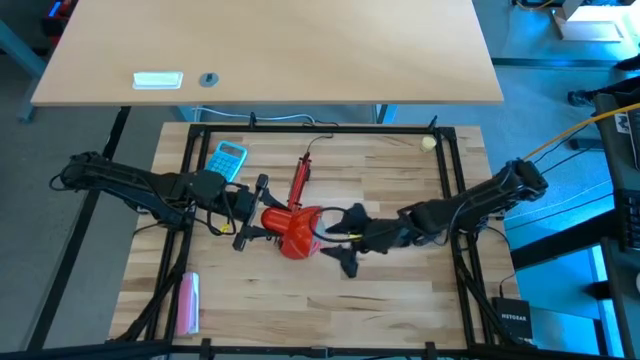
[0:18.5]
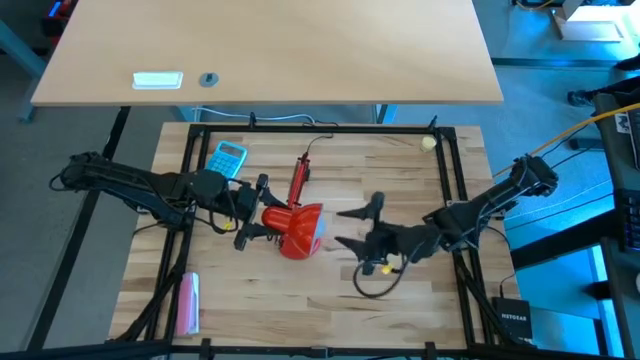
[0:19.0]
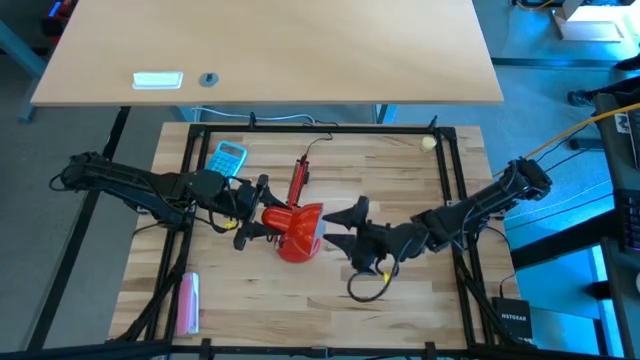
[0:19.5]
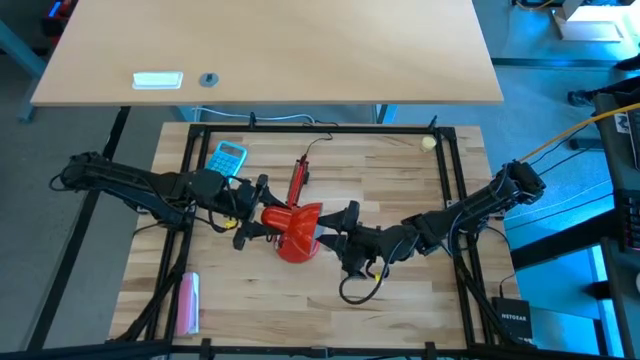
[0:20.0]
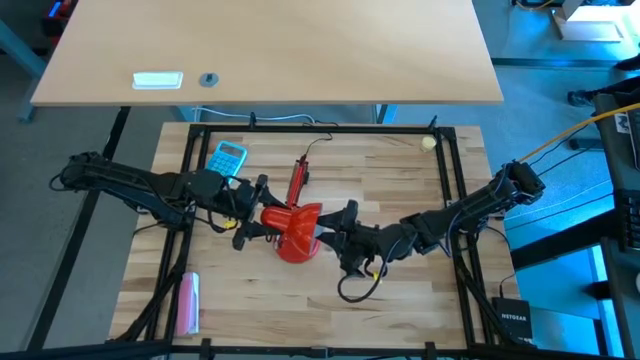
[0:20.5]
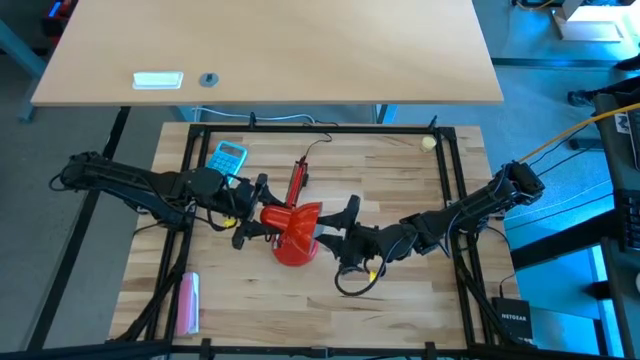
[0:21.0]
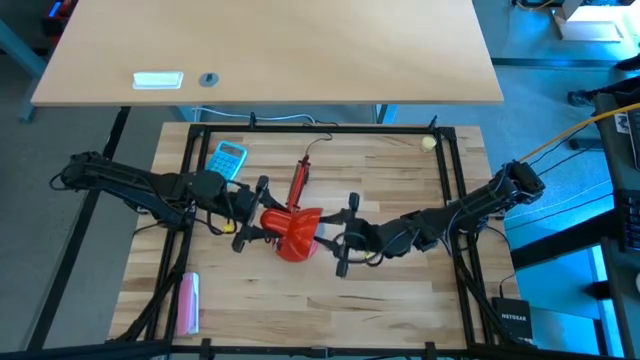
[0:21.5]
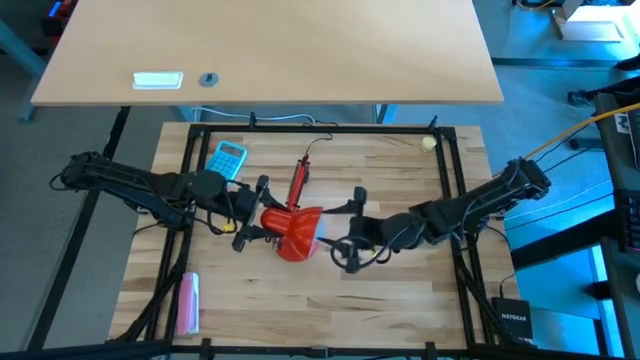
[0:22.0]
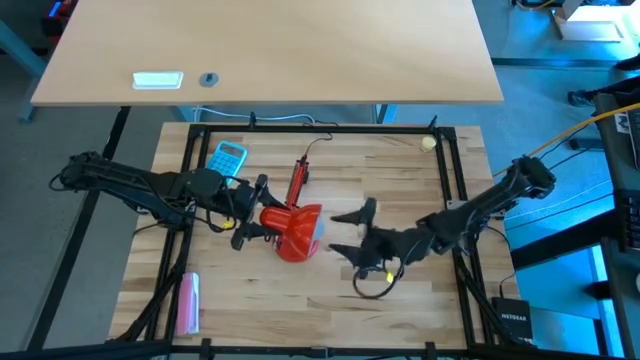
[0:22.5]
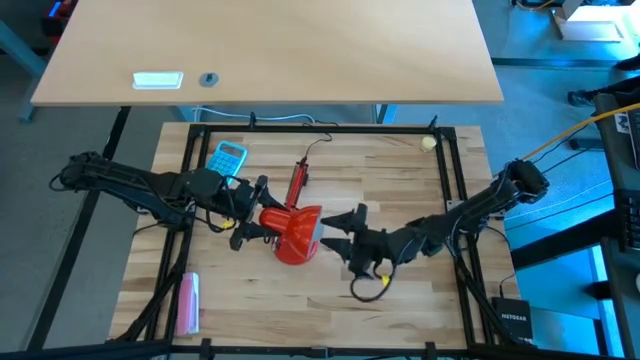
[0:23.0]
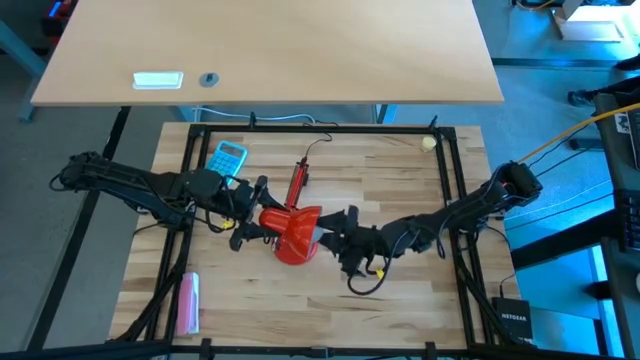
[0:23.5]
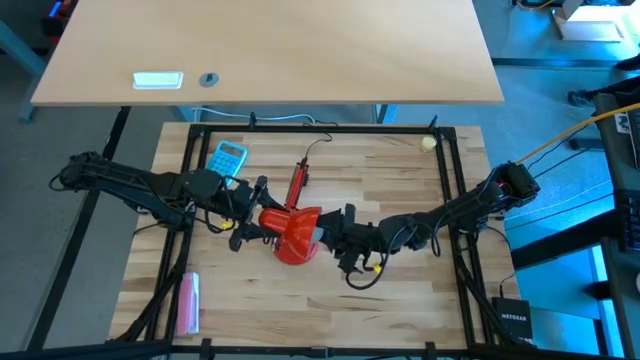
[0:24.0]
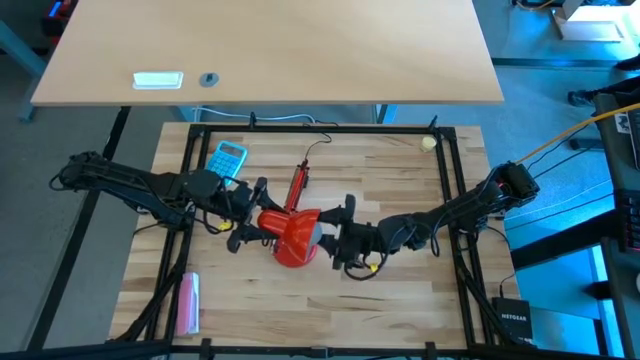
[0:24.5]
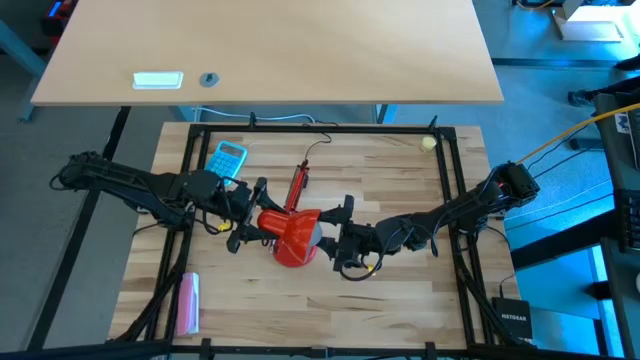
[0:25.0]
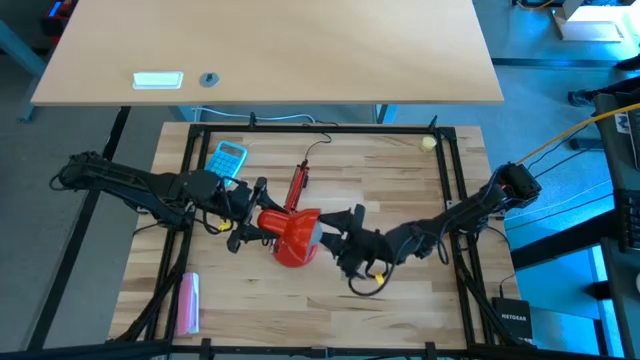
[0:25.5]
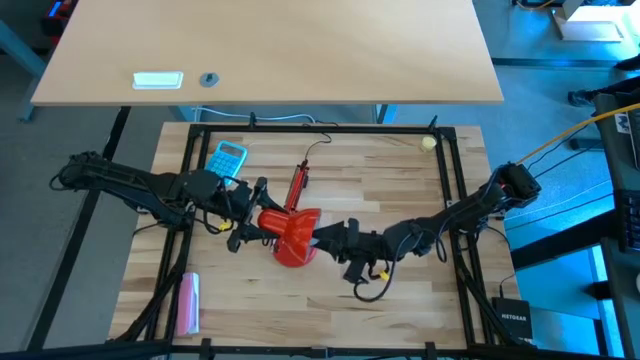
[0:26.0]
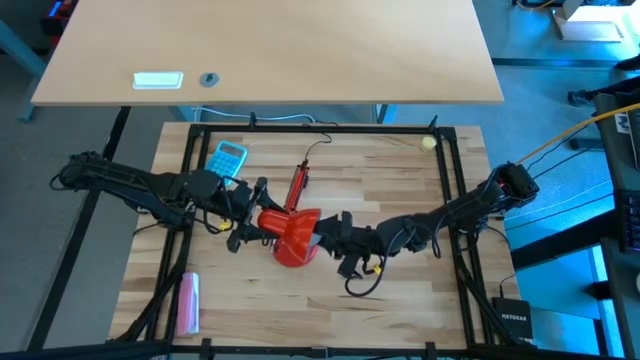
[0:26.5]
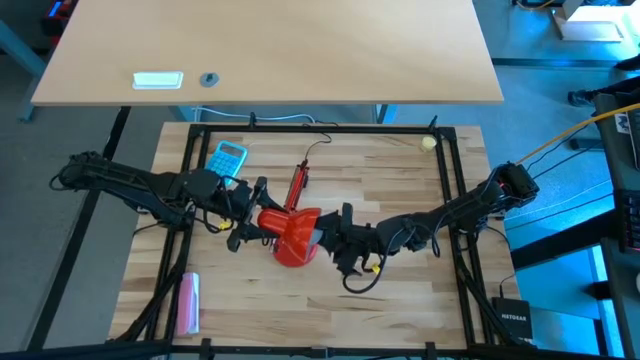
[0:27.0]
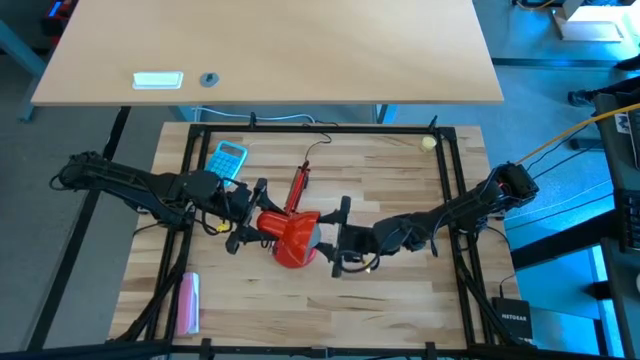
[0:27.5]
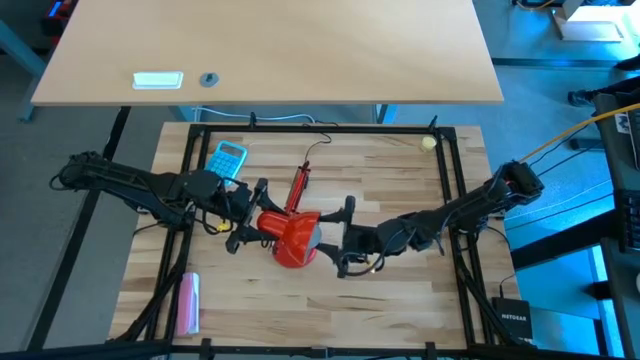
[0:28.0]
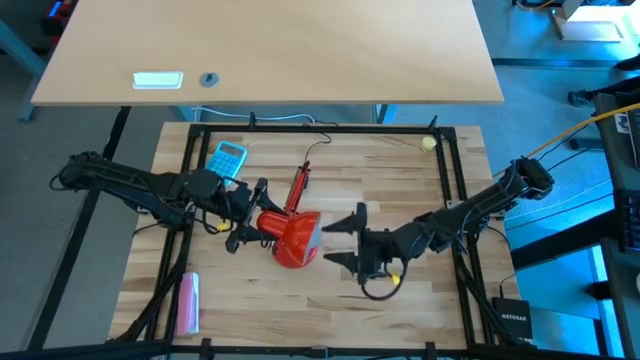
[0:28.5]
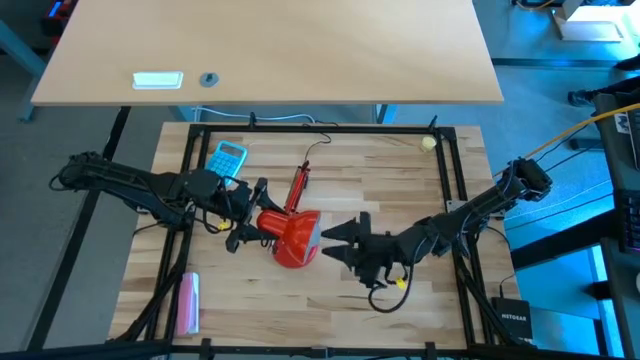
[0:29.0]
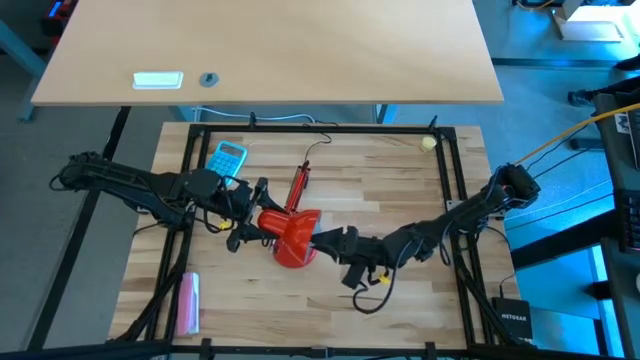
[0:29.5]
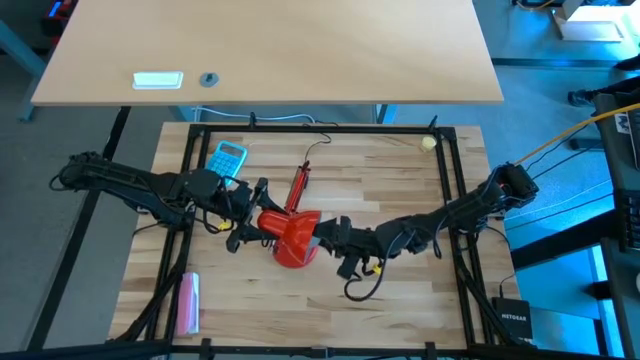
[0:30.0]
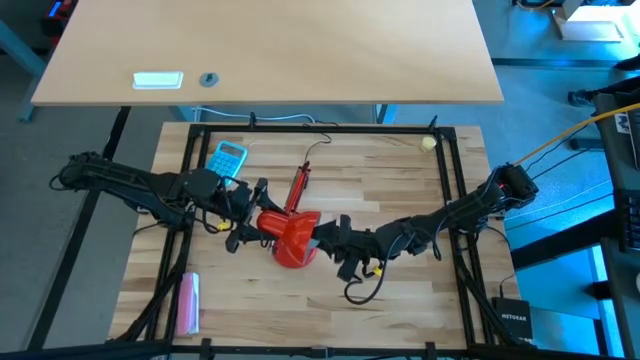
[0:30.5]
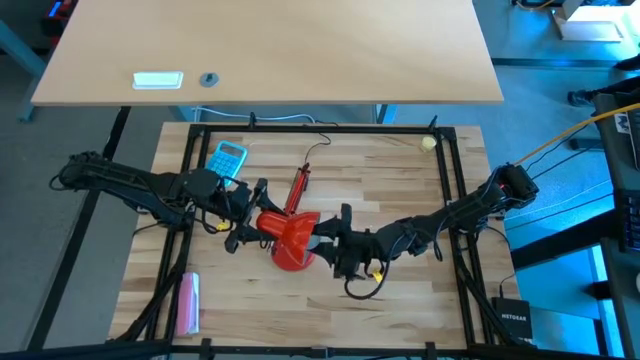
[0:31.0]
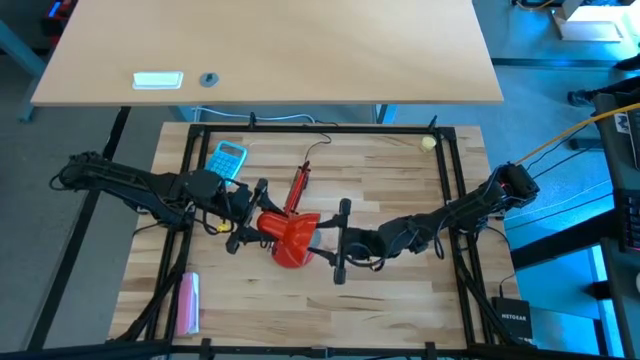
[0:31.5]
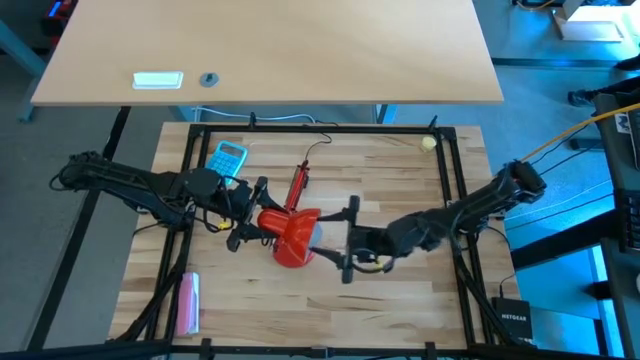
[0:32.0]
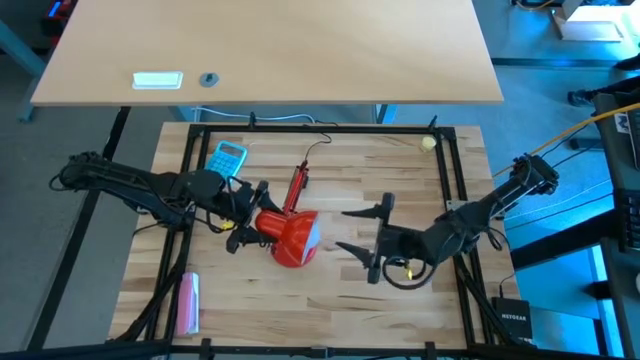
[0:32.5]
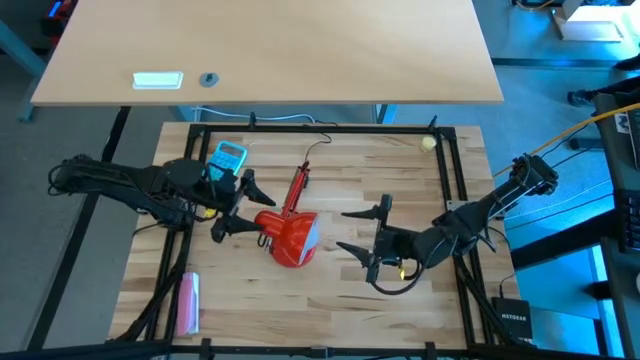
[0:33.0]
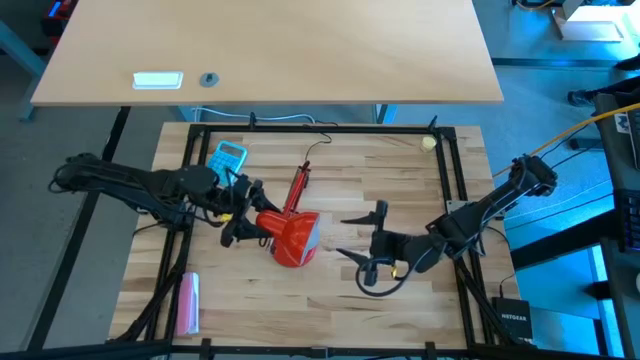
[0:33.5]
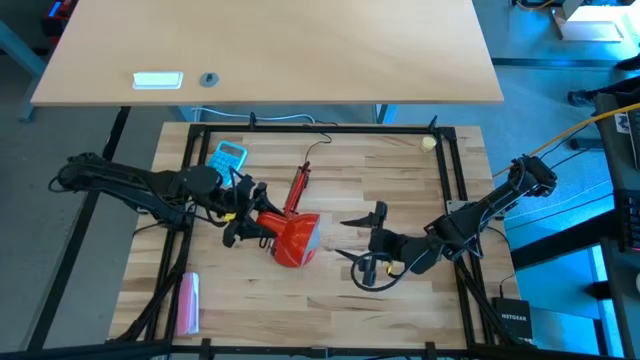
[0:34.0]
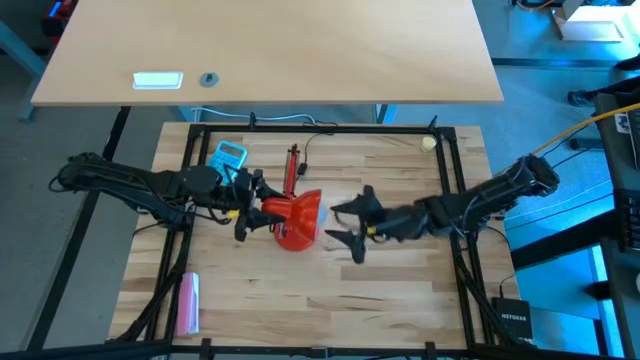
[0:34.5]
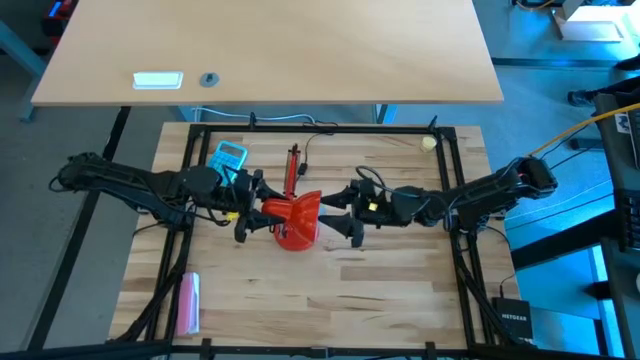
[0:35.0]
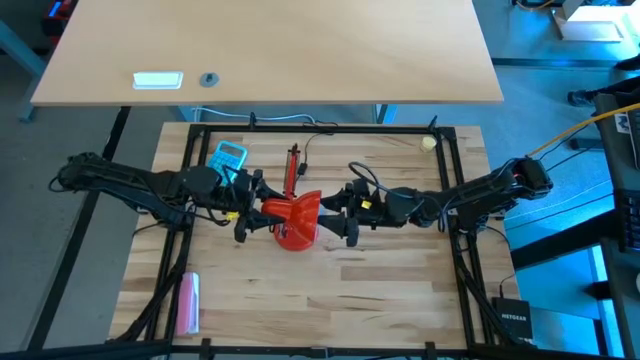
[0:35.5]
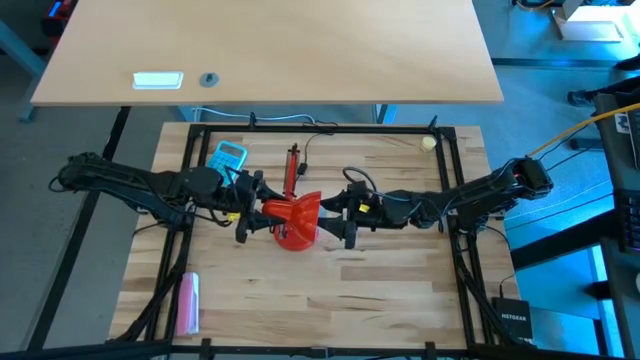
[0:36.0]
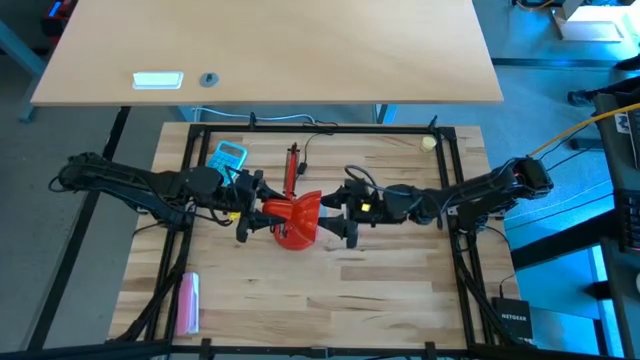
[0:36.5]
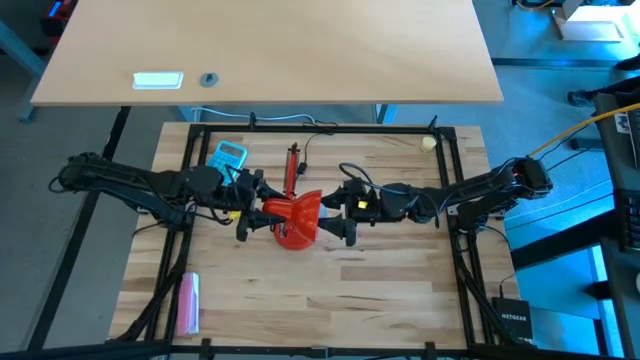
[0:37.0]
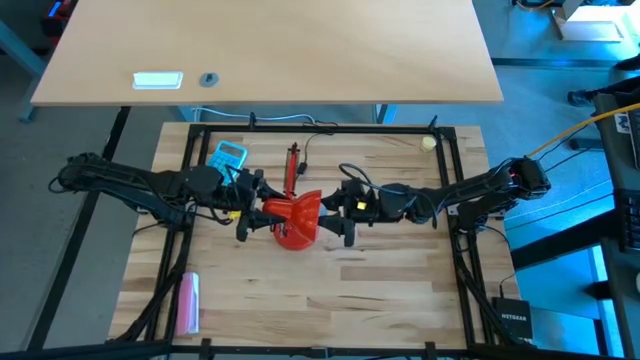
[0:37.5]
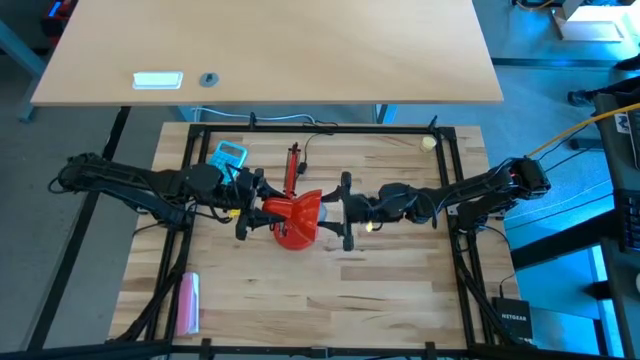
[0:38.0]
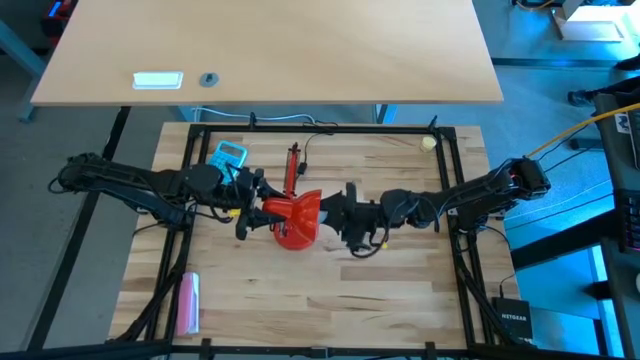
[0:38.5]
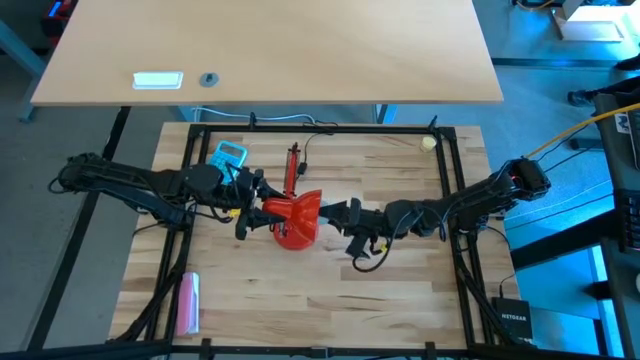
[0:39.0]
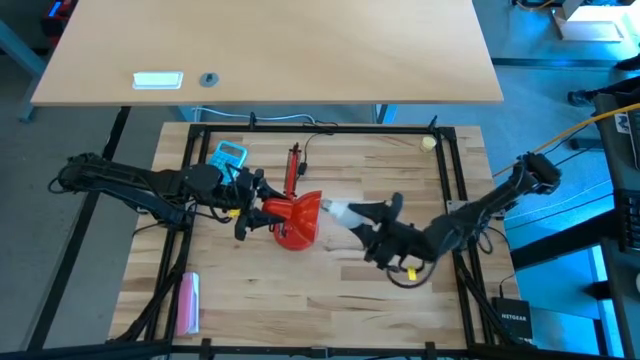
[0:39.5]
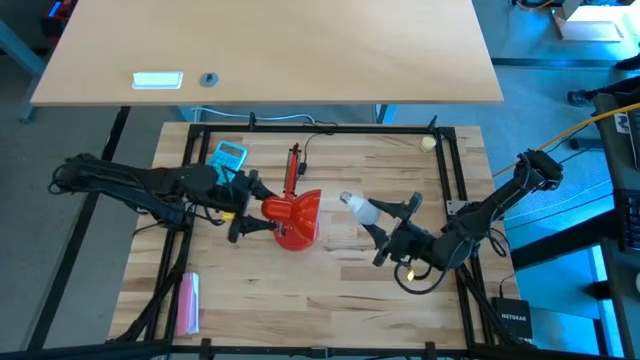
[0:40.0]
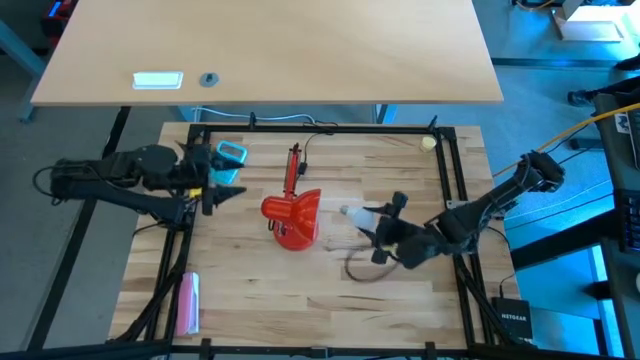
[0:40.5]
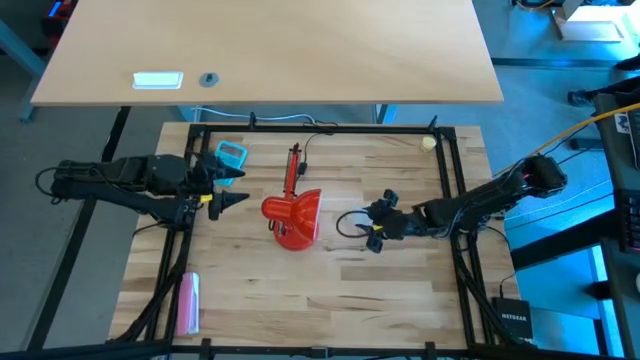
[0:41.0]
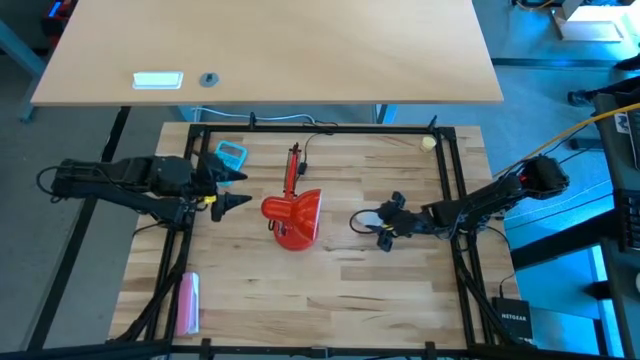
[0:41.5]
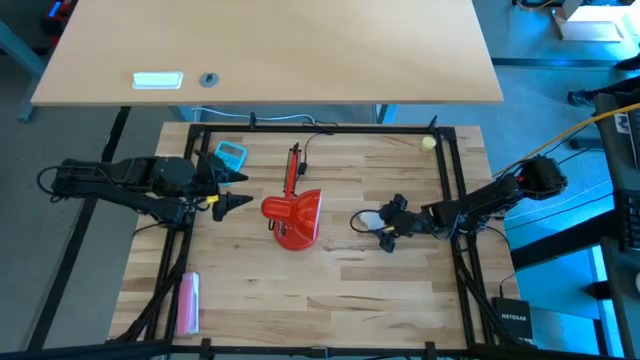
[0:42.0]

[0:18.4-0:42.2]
Task: Screw lightbulb
Remove the lightbulb from the lamp
